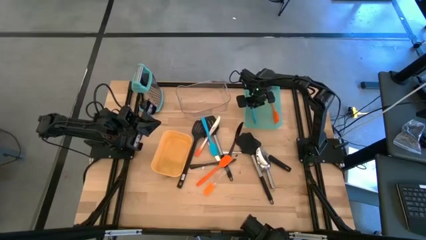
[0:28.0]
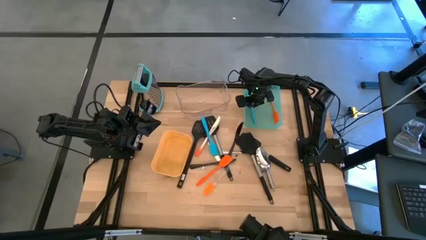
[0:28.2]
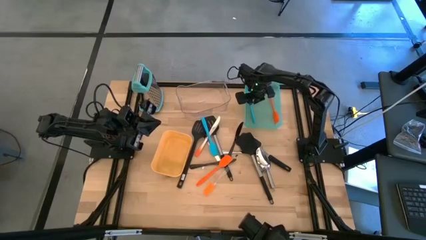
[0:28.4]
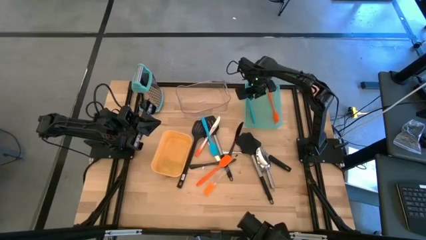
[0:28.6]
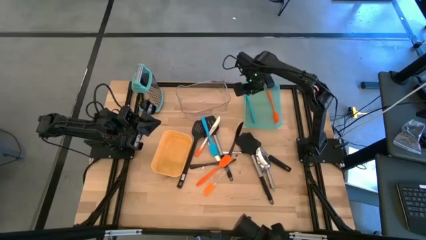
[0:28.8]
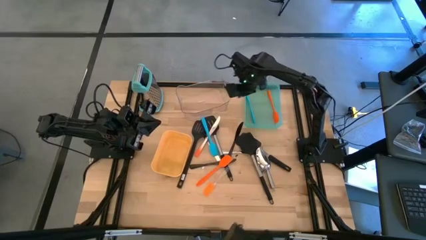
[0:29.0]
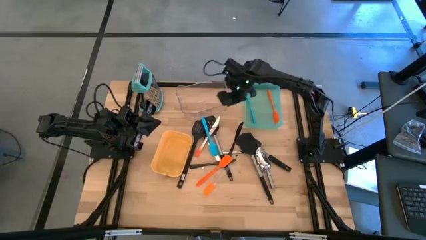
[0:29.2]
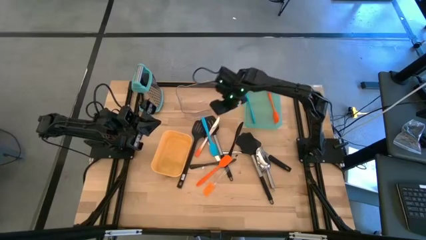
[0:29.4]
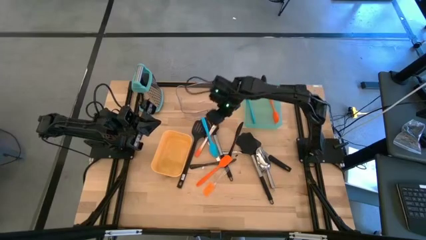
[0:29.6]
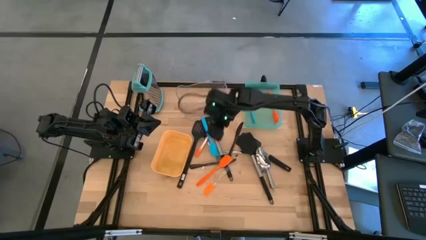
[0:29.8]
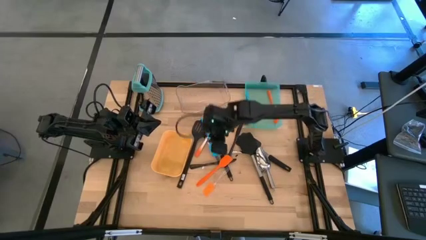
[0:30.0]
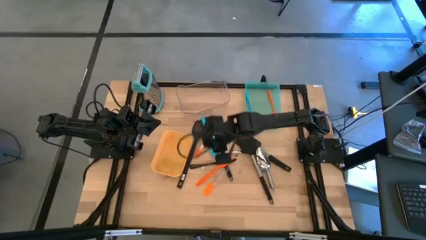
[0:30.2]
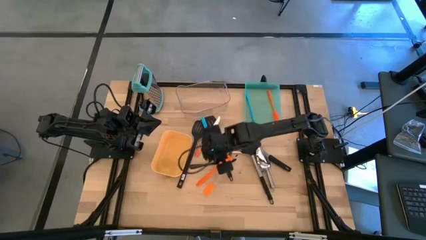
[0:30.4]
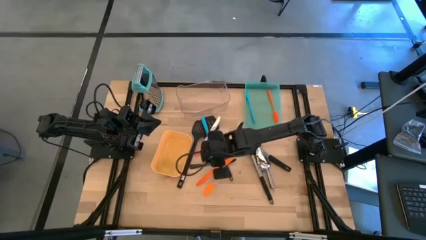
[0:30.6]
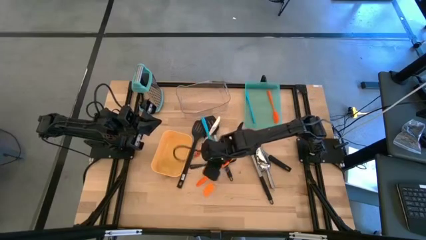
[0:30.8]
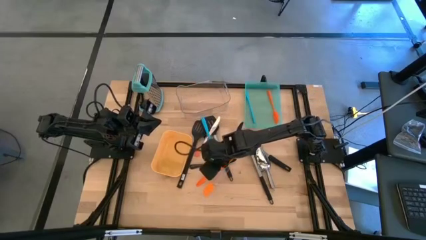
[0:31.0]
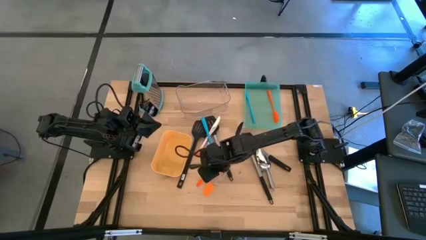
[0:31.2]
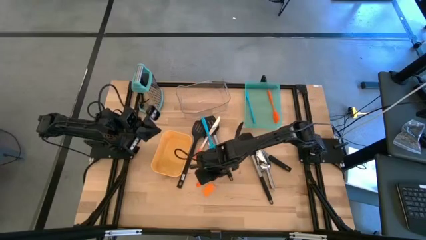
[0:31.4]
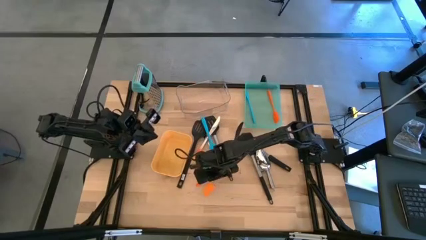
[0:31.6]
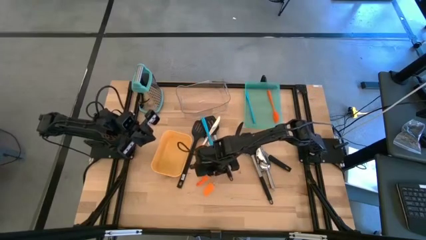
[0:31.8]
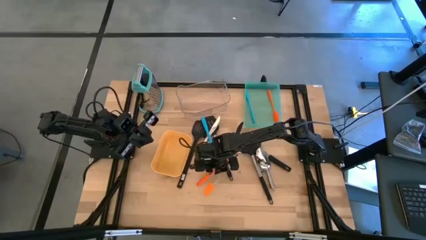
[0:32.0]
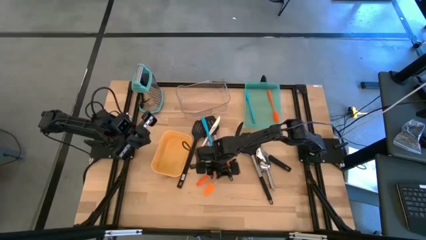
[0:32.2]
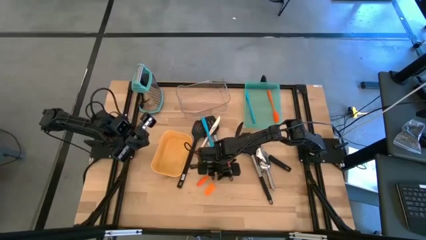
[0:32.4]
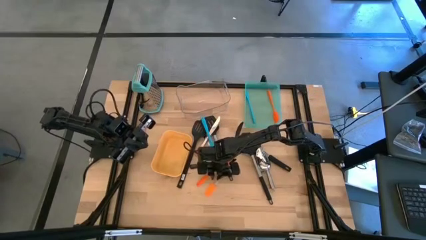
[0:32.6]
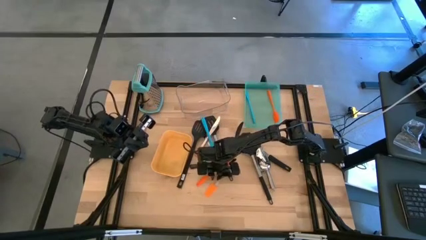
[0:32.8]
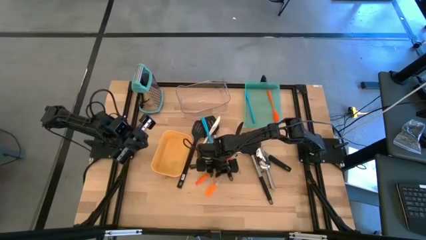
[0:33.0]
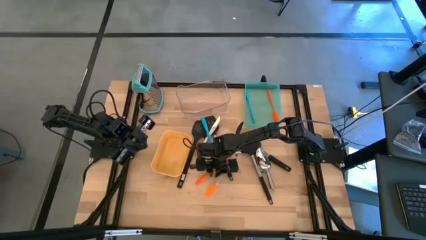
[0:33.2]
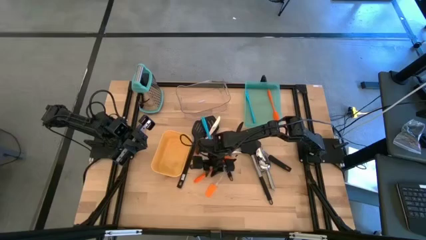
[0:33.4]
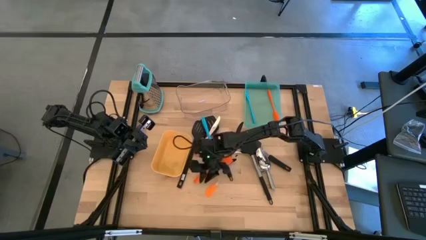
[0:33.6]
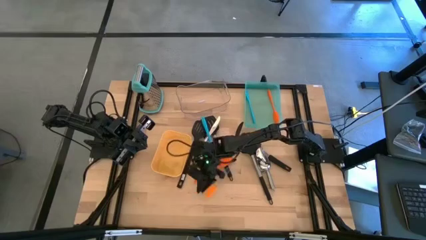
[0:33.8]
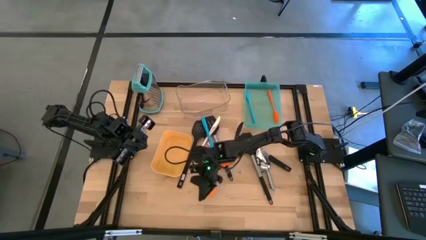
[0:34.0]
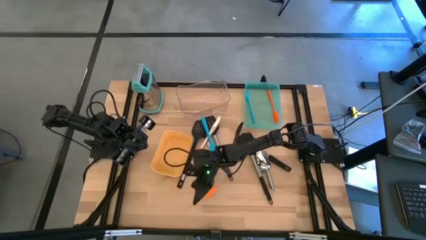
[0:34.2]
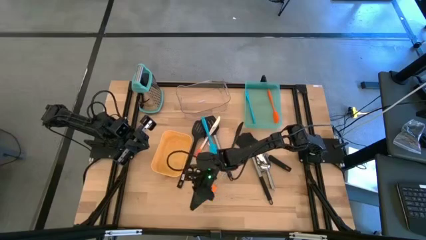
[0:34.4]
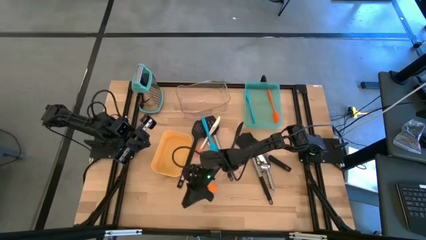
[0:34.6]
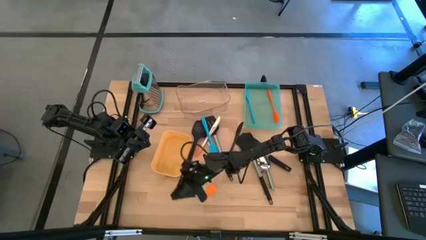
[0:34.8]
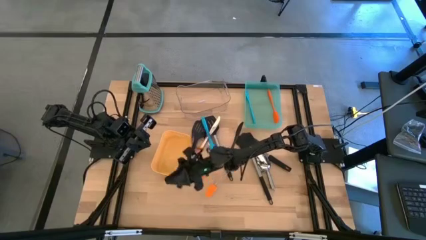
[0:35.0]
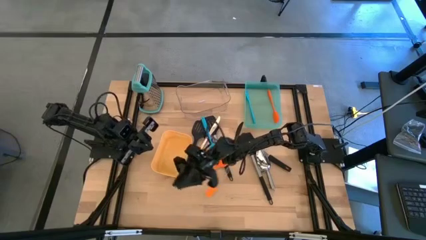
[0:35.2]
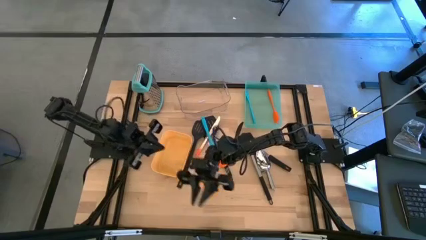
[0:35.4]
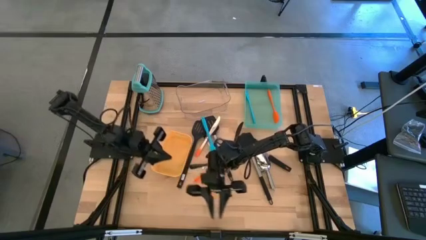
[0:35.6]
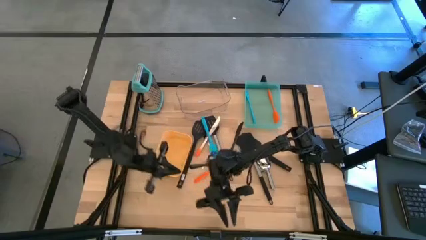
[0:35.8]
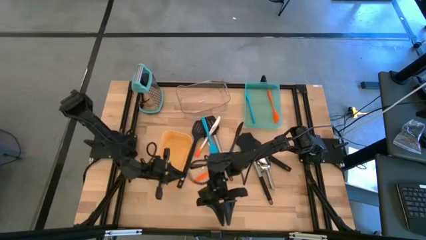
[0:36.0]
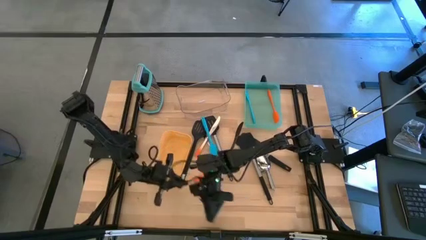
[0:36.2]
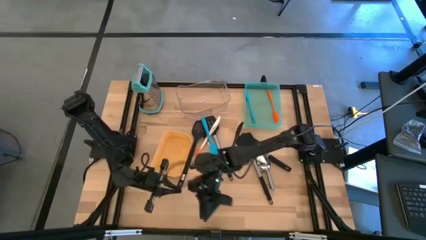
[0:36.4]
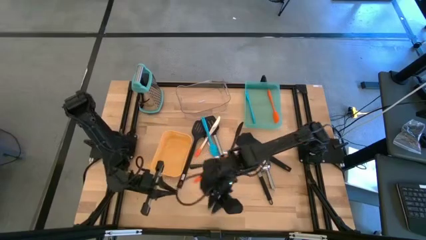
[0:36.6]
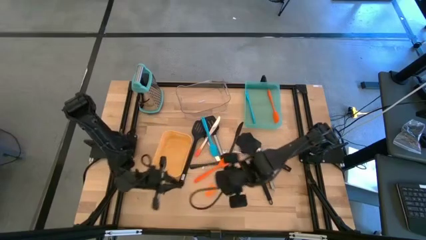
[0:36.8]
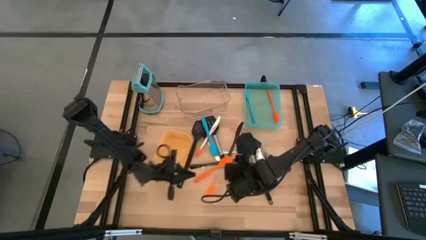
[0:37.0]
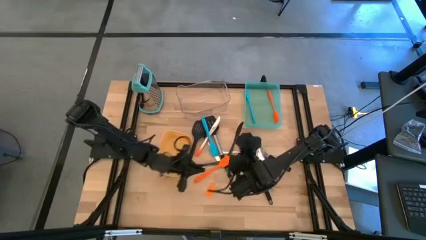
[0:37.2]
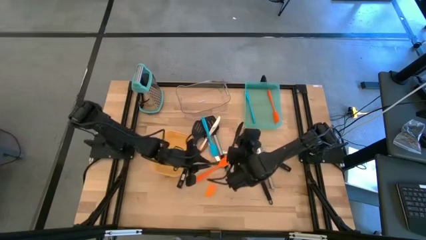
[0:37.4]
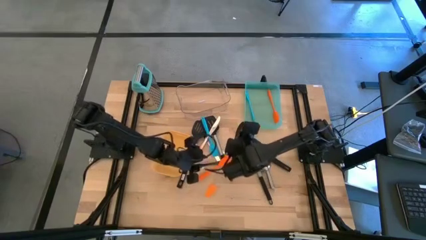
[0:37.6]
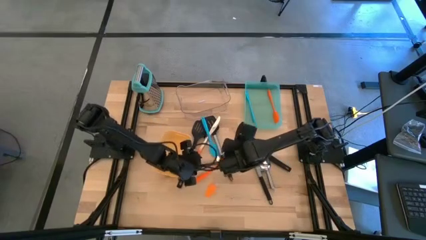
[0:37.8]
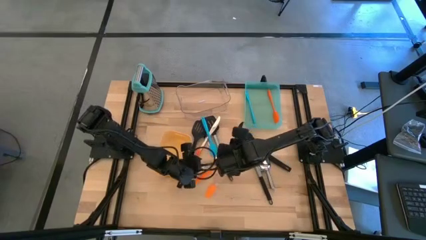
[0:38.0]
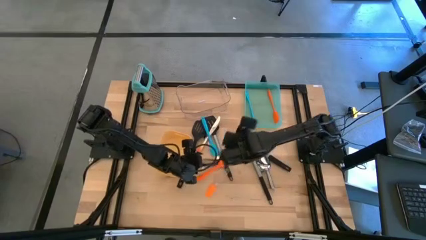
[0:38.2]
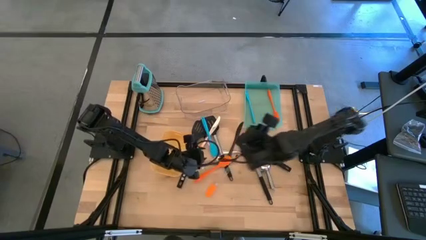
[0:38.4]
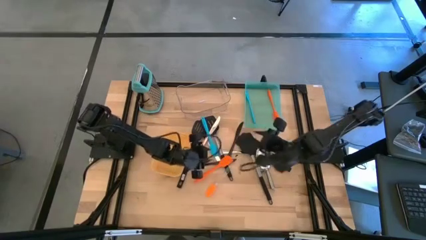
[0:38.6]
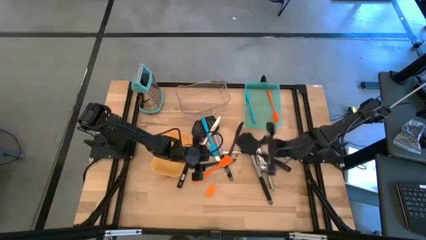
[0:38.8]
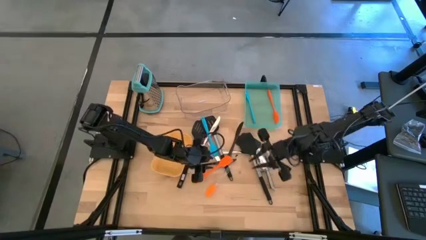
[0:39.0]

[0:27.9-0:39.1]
Task: Pick & Place Kitchen Items
Put the orange spatula into the green bin
